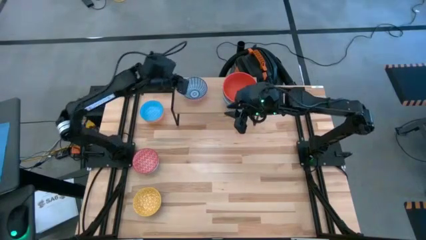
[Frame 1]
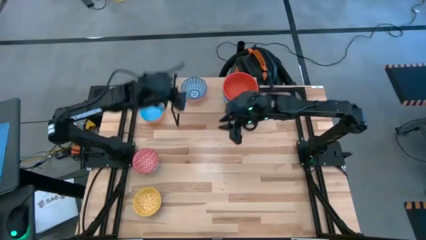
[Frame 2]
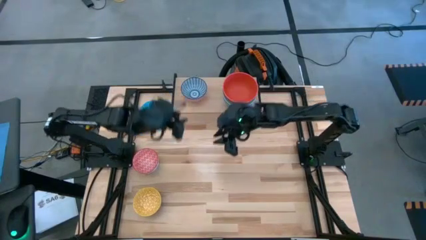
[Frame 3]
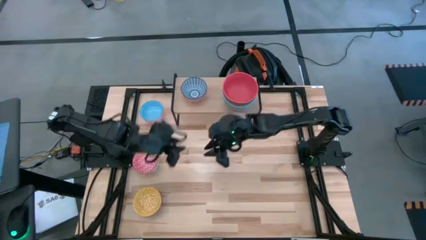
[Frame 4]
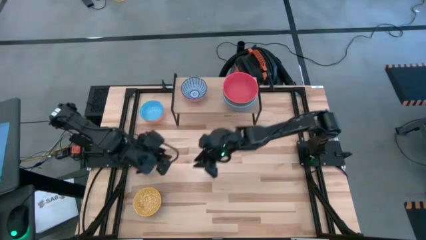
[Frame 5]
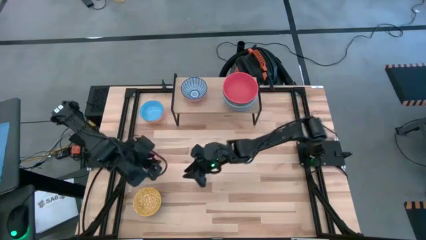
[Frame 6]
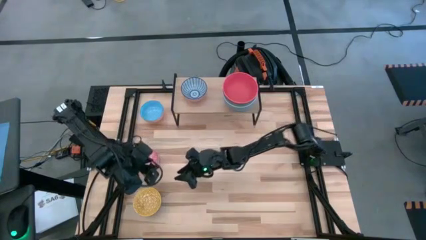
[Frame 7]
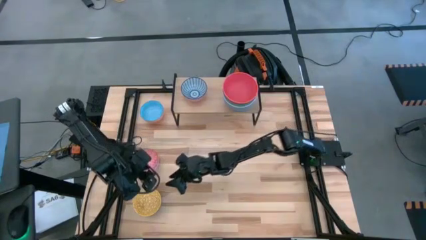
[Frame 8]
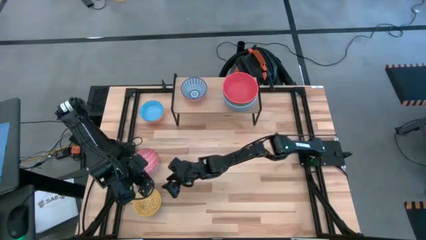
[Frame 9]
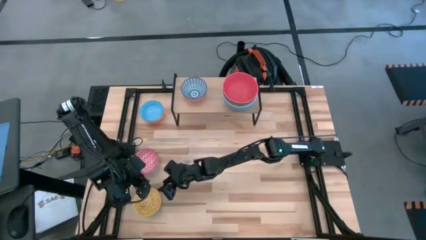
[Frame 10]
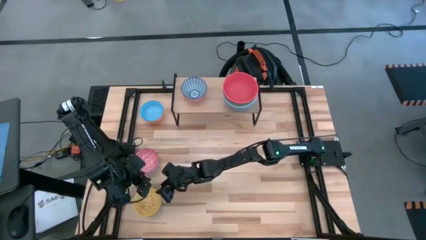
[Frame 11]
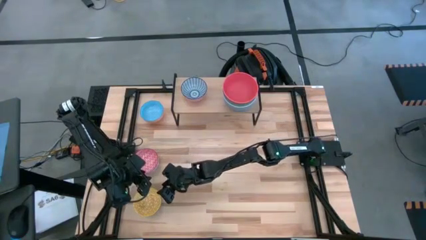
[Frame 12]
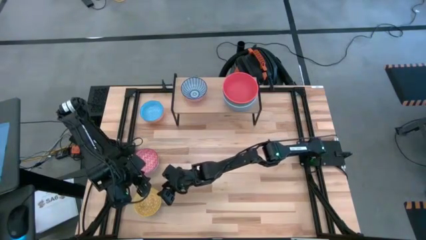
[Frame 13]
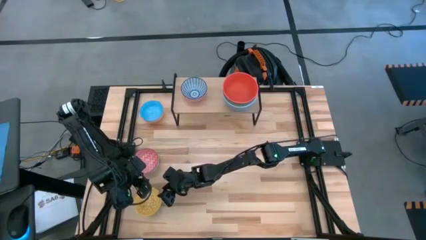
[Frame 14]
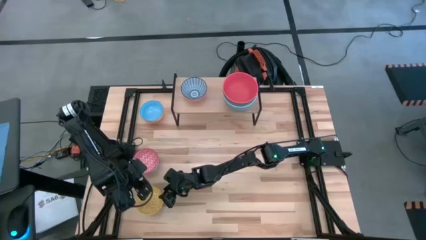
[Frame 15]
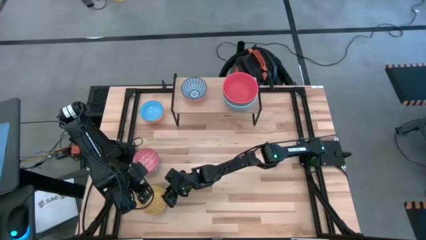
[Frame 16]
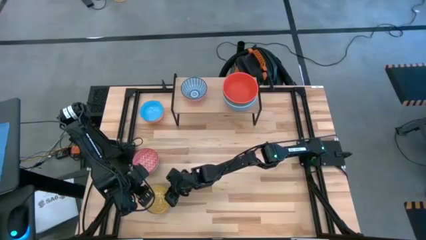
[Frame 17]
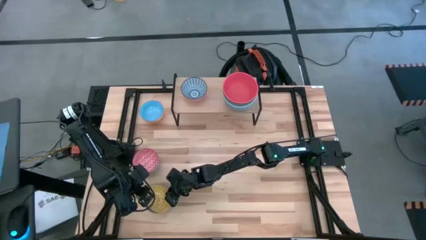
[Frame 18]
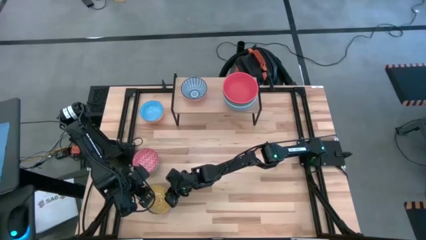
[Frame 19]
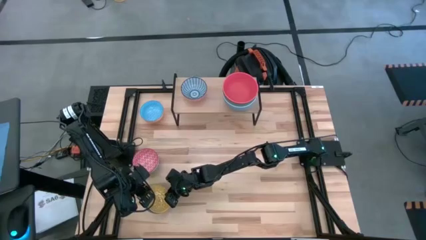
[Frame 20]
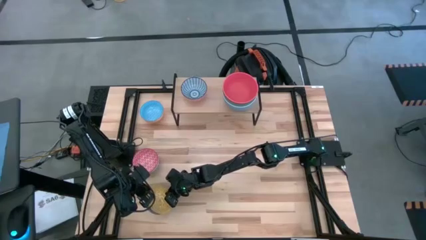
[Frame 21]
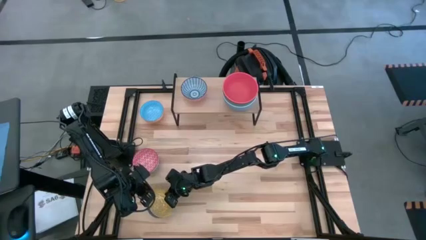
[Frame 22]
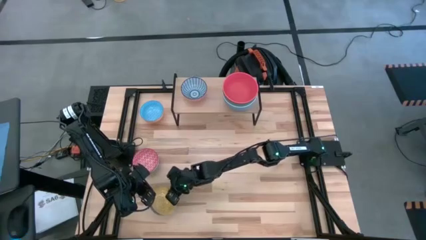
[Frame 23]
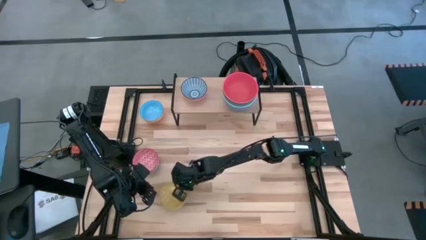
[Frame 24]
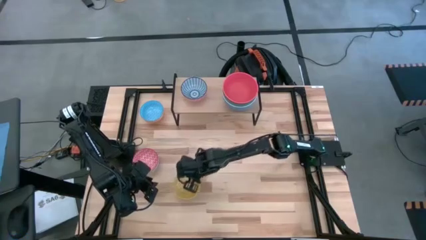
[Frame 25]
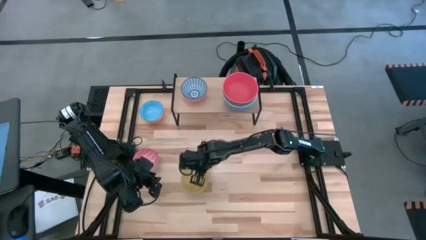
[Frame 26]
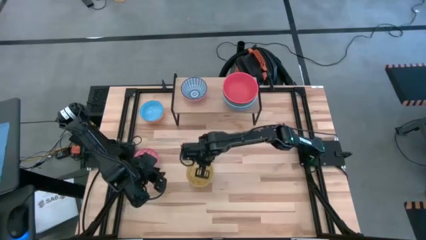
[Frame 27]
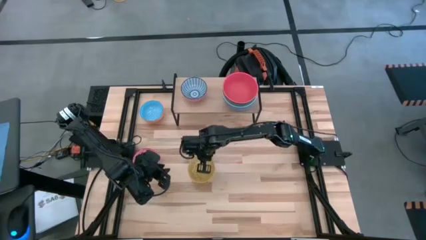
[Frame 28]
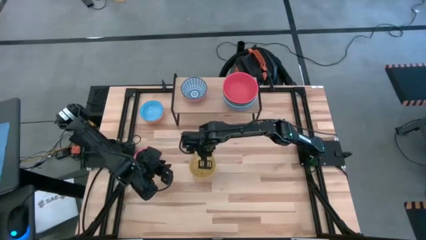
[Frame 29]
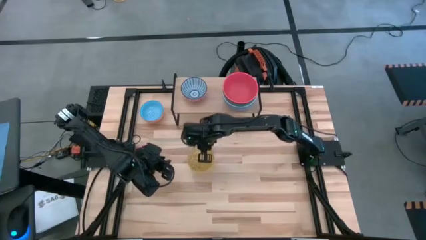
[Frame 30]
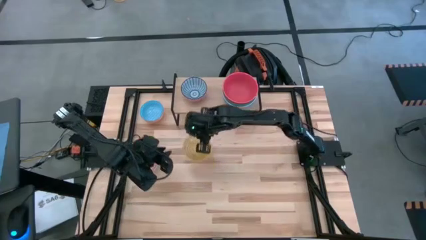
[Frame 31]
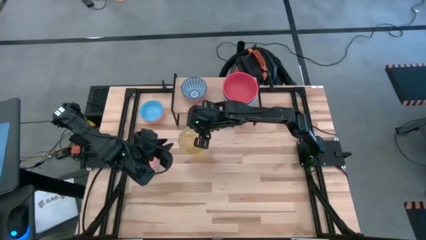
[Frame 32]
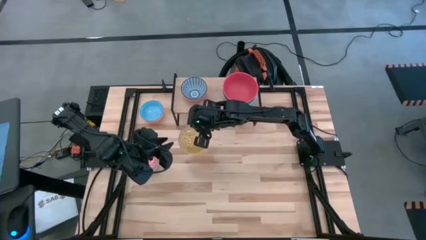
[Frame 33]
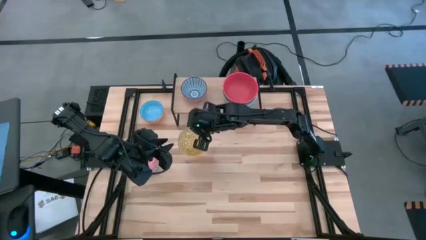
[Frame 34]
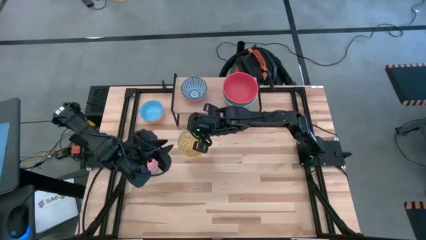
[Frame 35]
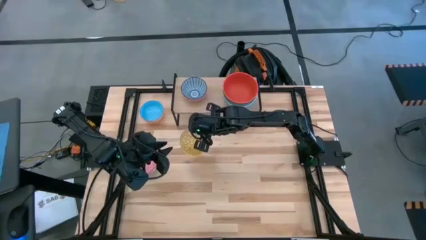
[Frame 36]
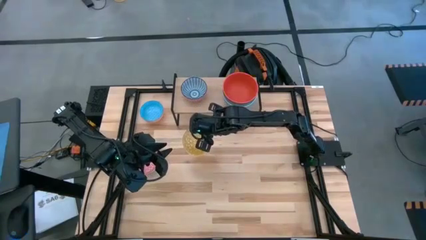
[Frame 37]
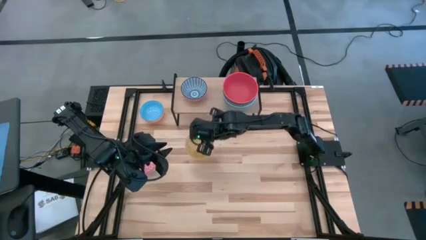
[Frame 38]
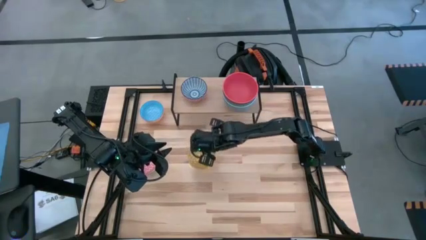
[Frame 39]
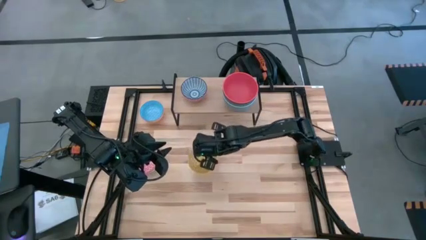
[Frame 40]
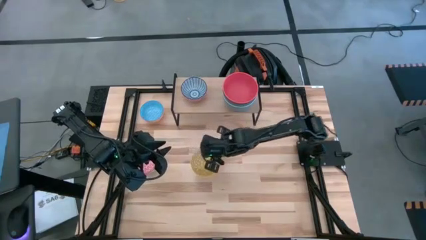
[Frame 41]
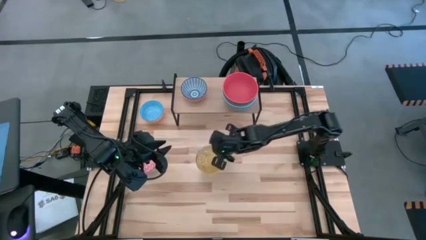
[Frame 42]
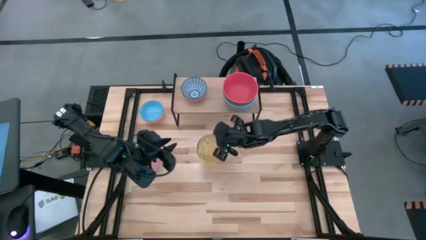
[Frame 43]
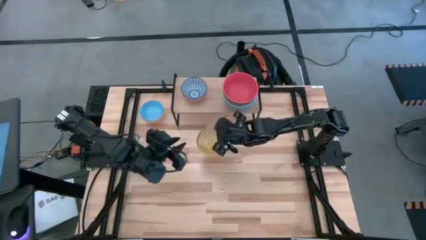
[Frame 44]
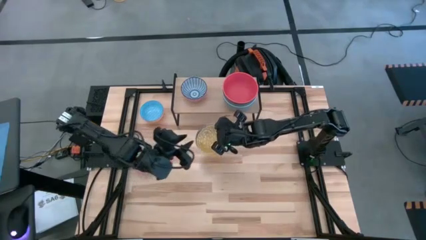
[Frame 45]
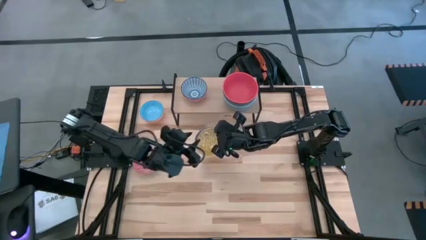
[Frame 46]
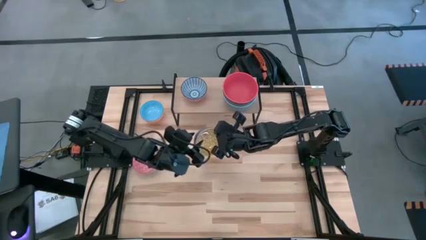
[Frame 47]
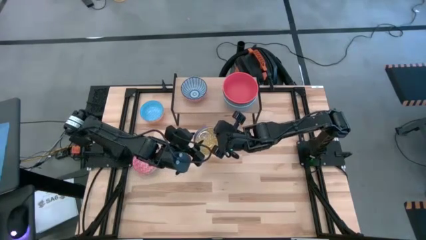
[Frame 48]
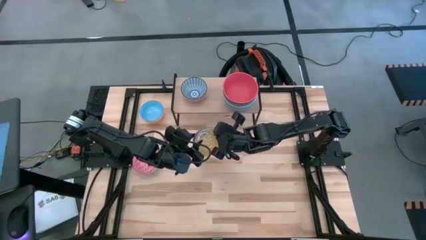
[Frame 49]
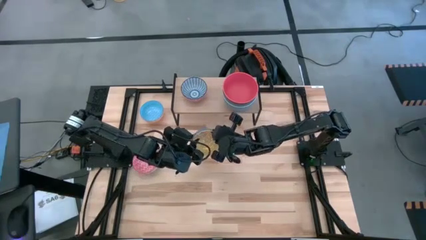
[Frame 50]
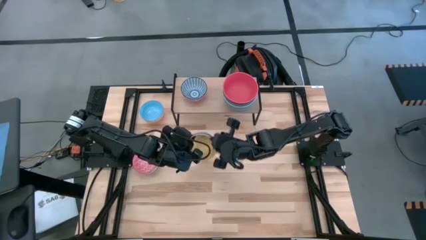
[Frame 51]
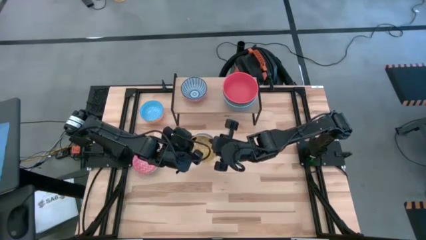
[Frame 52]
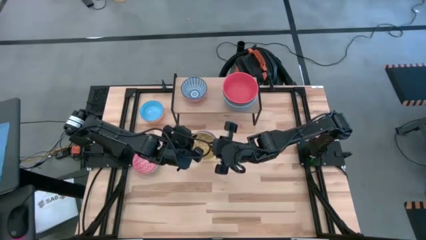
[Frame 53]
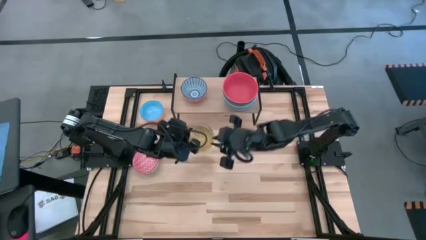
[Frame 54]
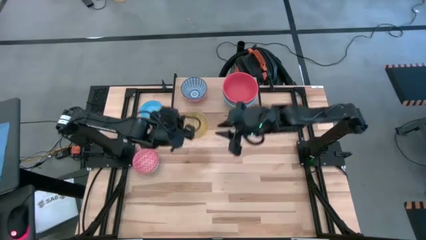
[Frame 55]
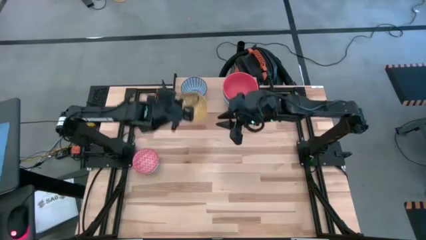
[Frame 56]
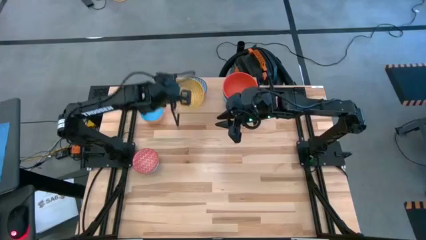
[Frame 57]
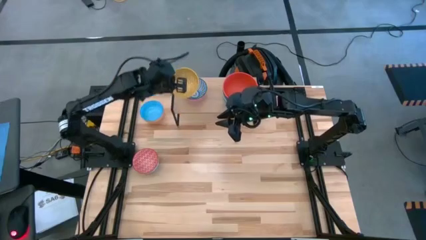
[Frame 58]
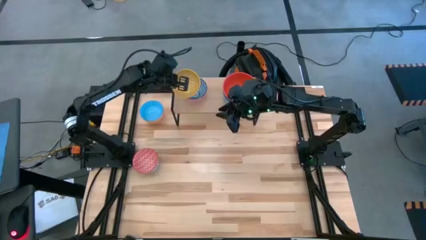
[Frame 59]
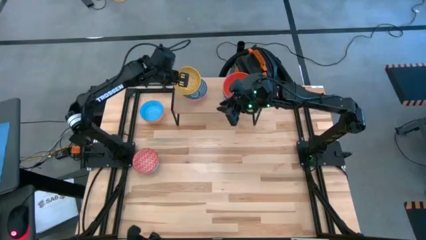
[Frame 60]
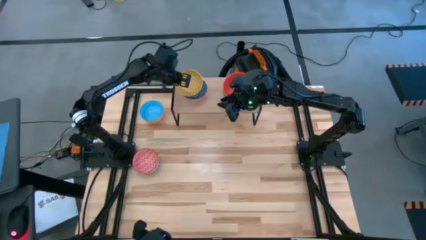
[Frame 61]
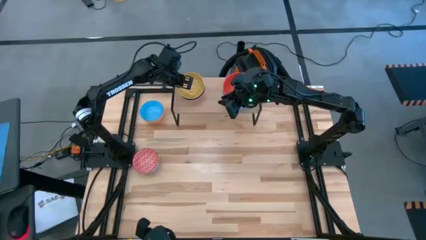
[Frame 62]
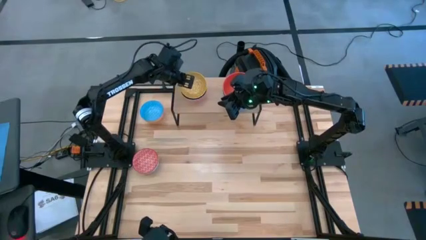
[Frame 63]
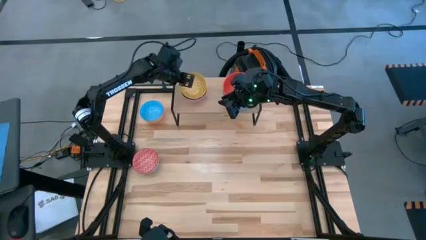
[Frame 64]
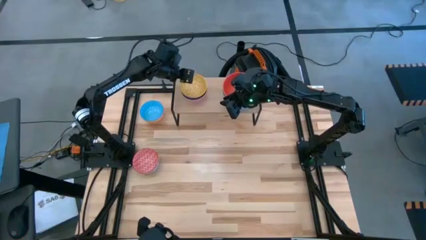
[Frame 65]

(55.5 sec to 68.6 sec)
Task: Place and stack bowls onto a shelf
Stack the patterned yellow bowl on top of the patterned blue bowl on the shelf
